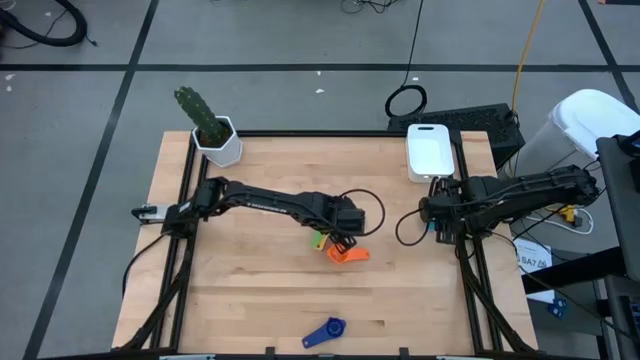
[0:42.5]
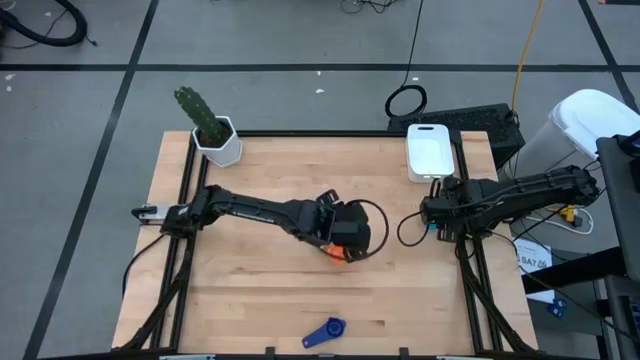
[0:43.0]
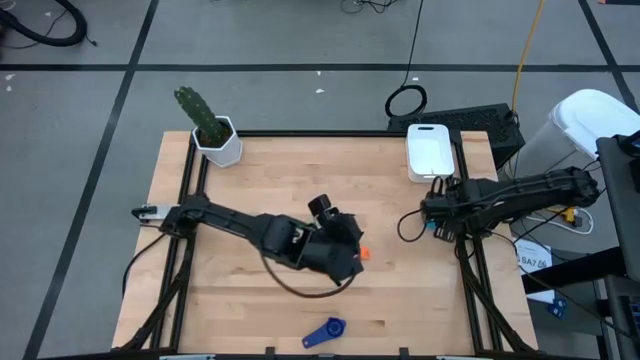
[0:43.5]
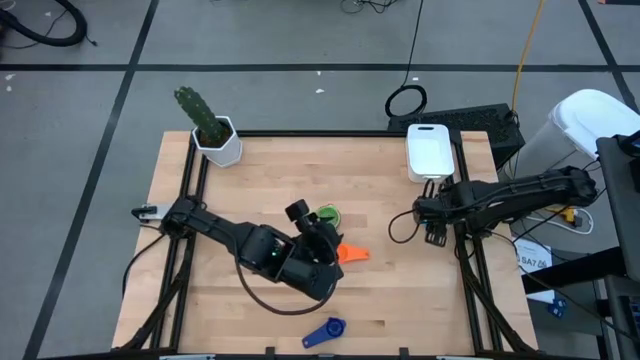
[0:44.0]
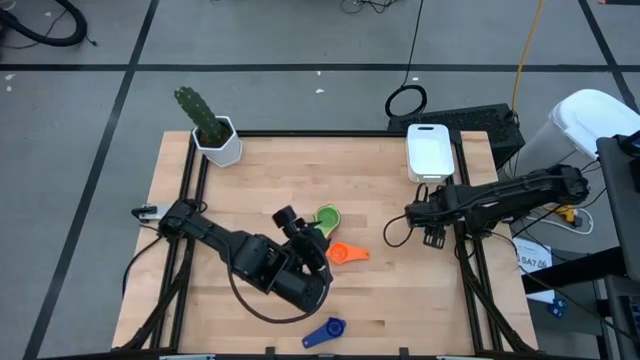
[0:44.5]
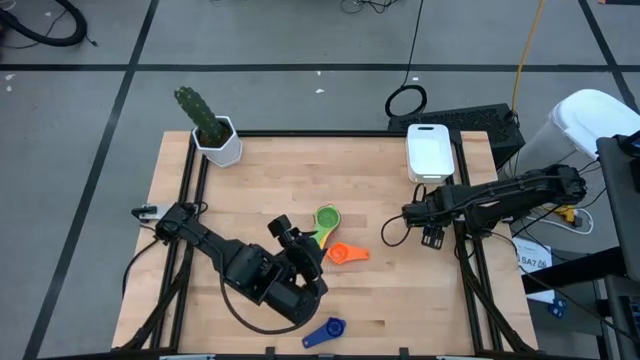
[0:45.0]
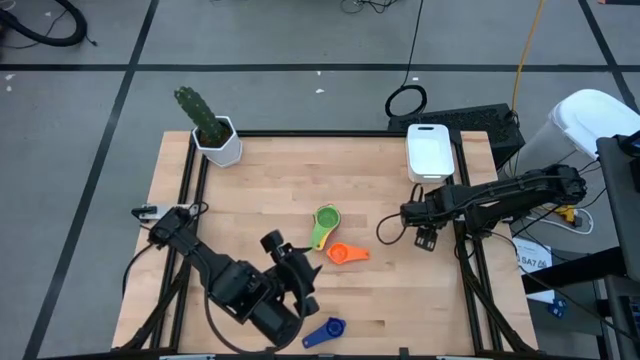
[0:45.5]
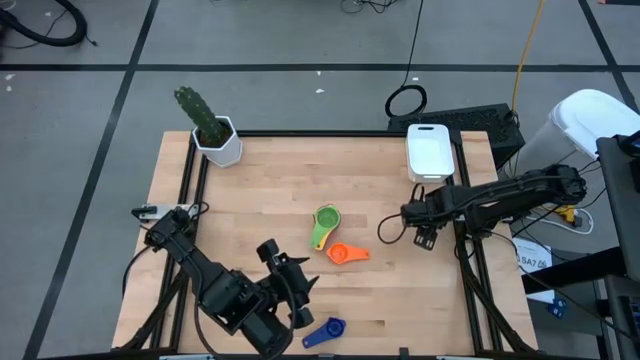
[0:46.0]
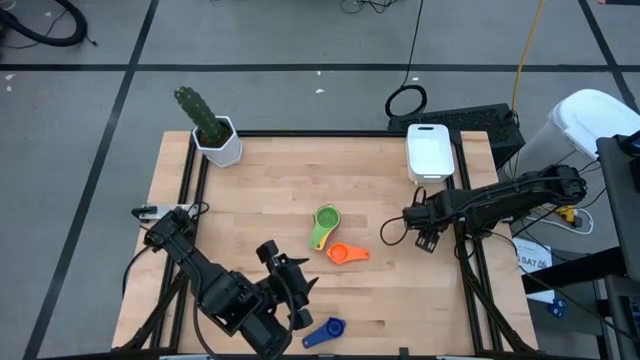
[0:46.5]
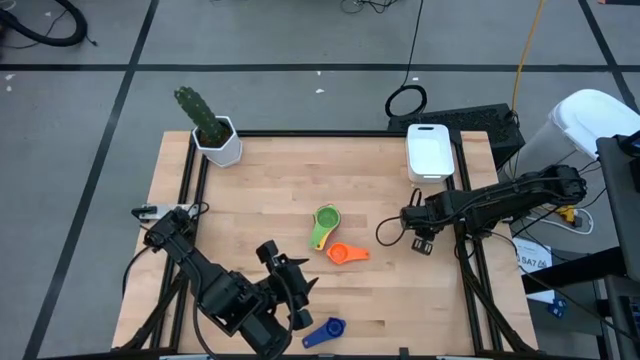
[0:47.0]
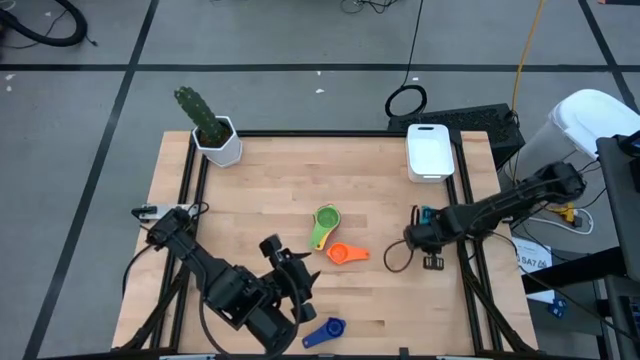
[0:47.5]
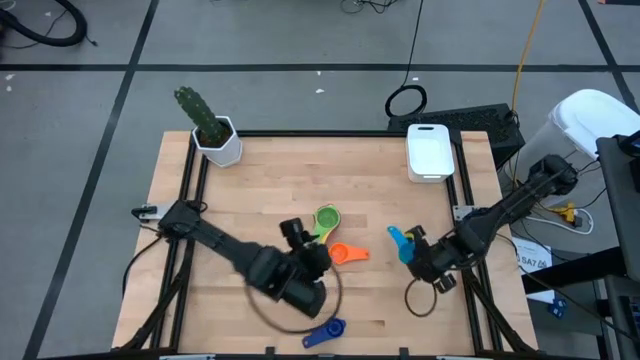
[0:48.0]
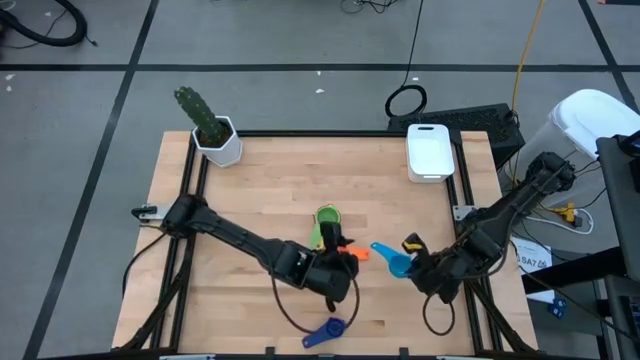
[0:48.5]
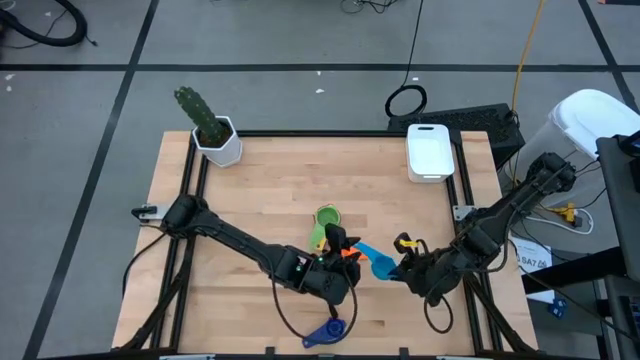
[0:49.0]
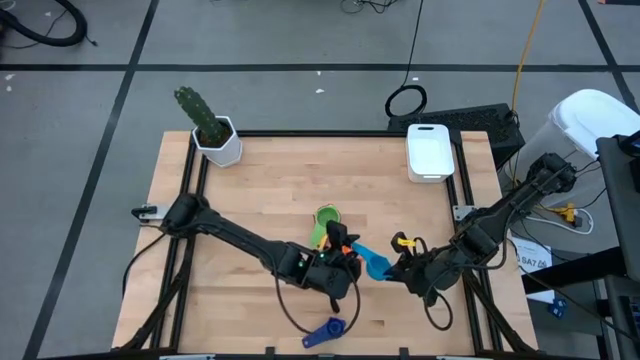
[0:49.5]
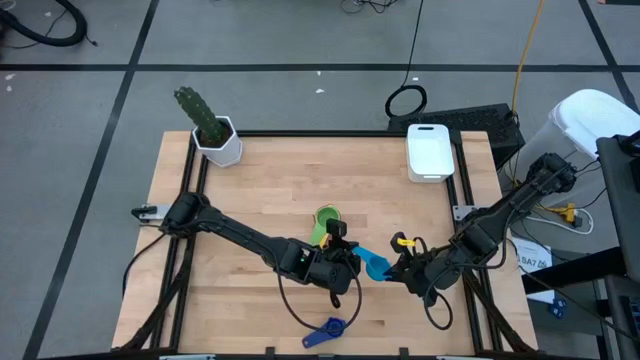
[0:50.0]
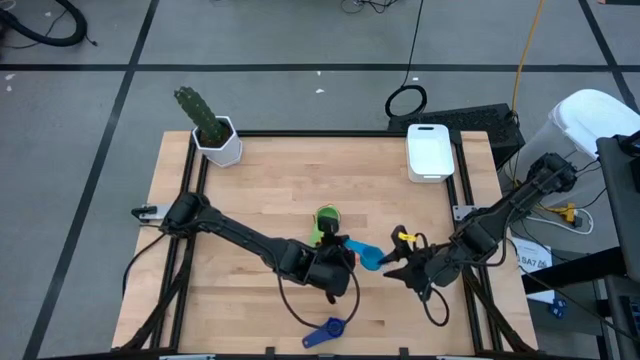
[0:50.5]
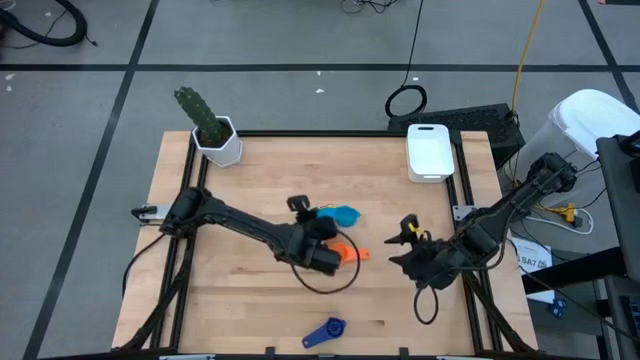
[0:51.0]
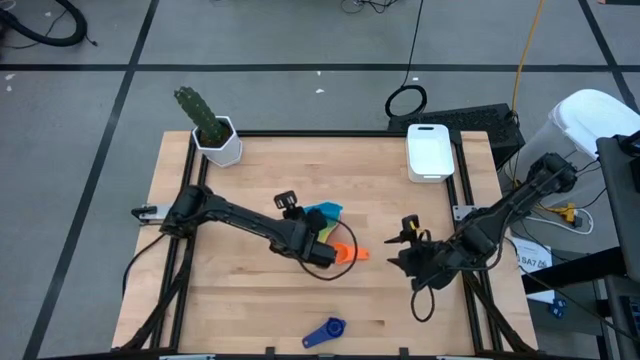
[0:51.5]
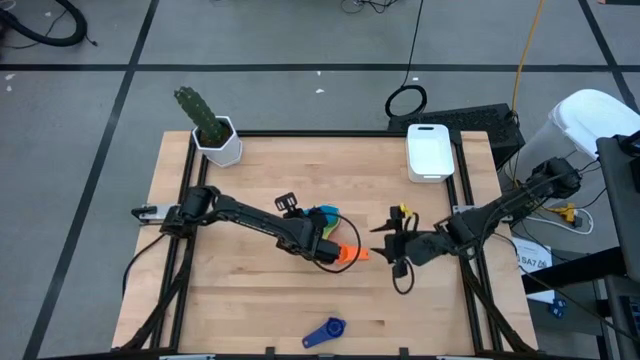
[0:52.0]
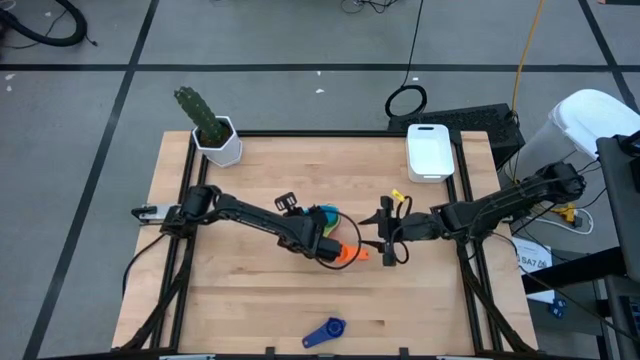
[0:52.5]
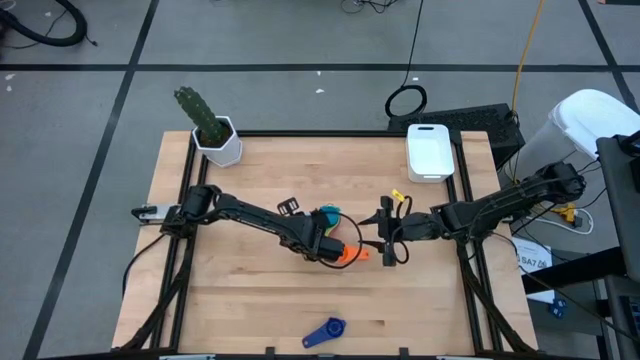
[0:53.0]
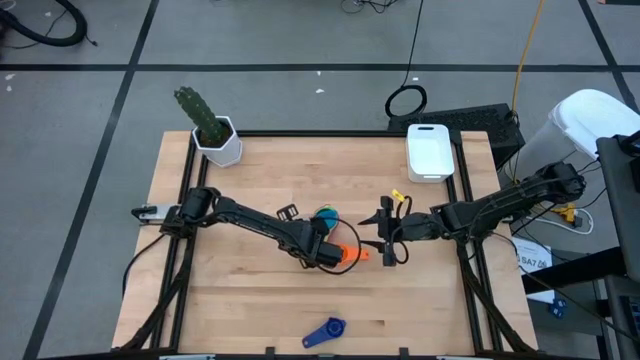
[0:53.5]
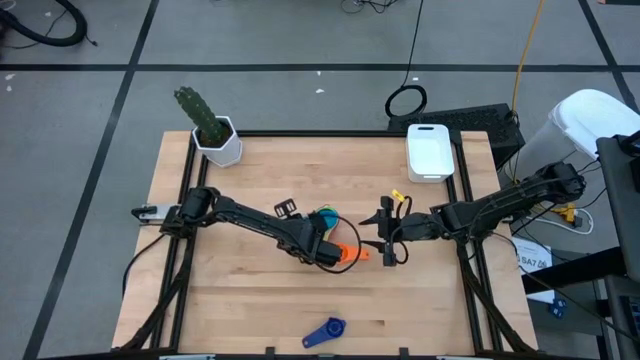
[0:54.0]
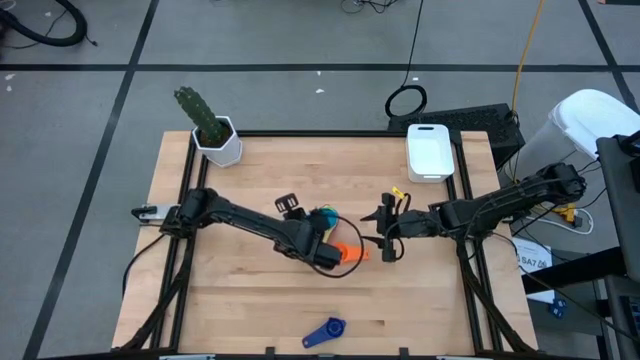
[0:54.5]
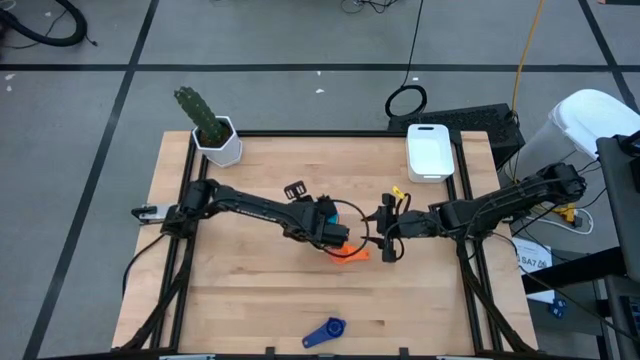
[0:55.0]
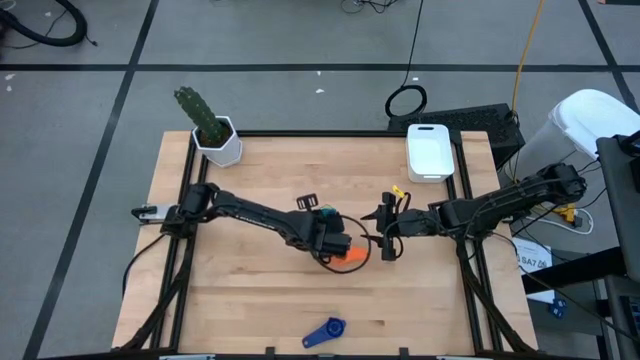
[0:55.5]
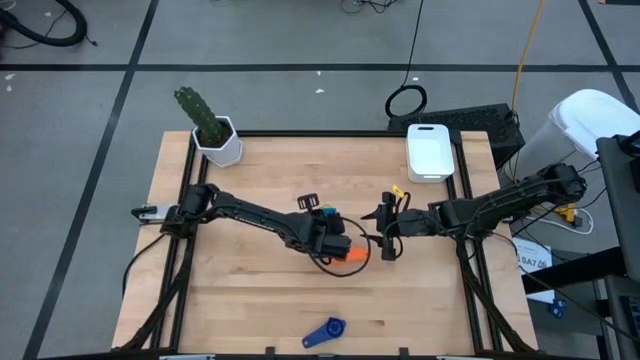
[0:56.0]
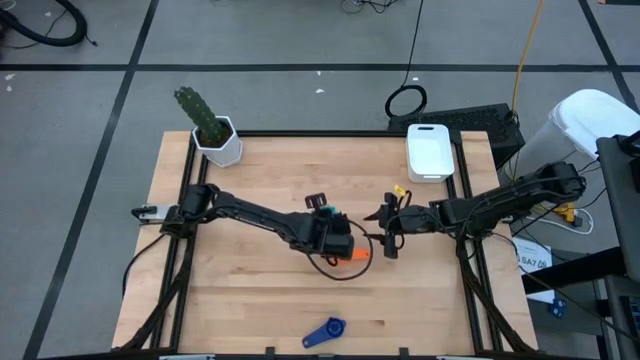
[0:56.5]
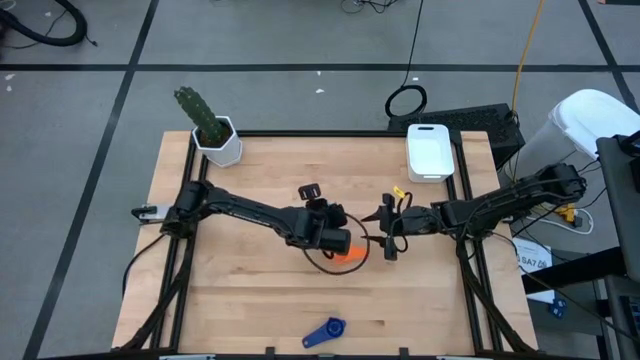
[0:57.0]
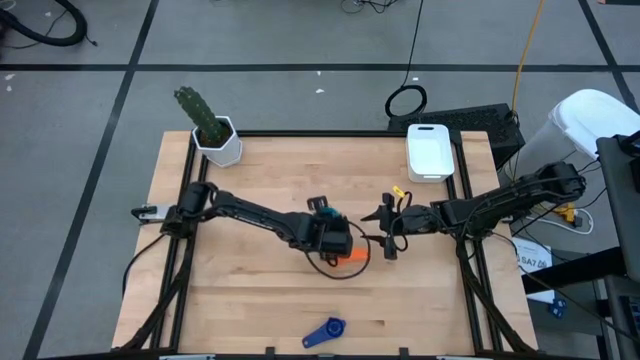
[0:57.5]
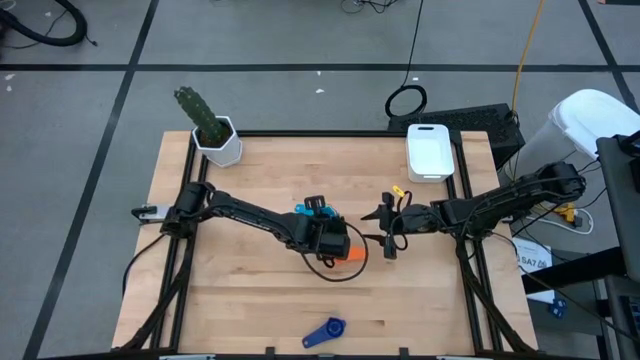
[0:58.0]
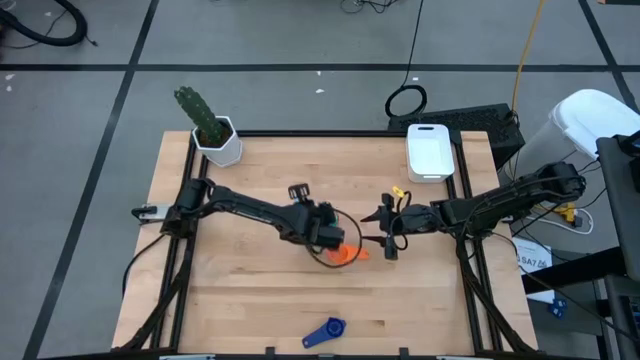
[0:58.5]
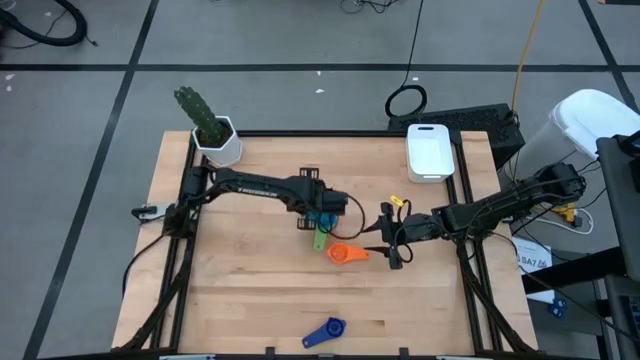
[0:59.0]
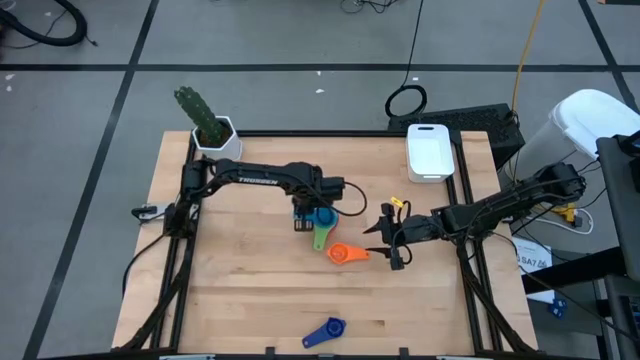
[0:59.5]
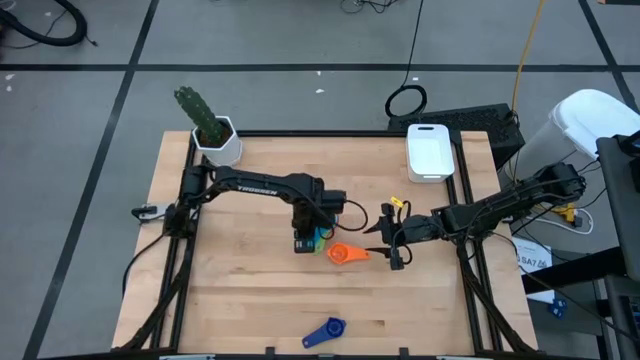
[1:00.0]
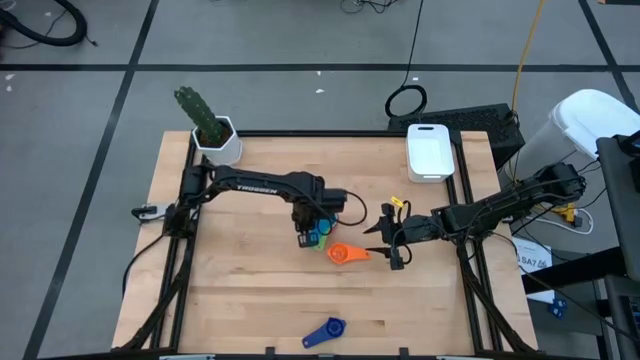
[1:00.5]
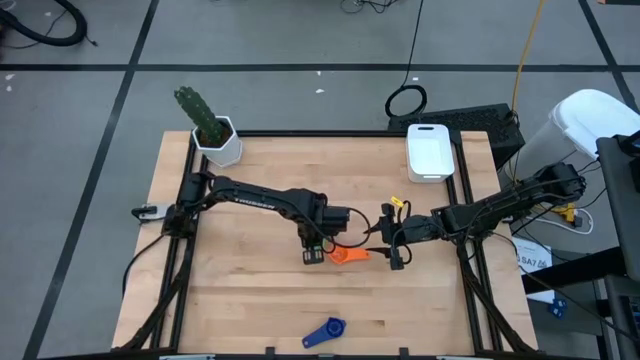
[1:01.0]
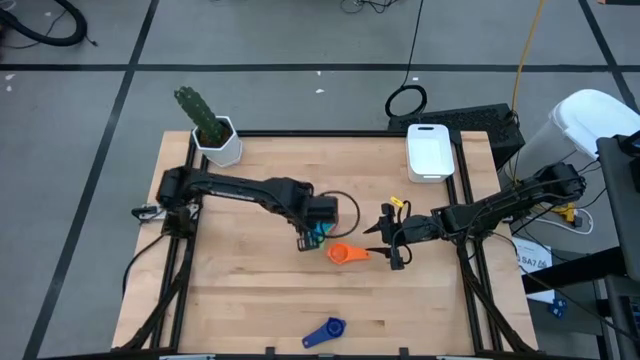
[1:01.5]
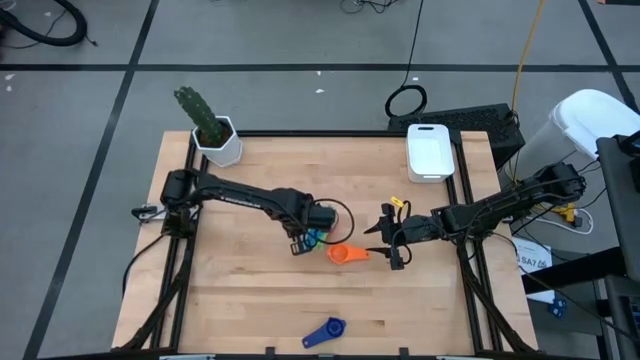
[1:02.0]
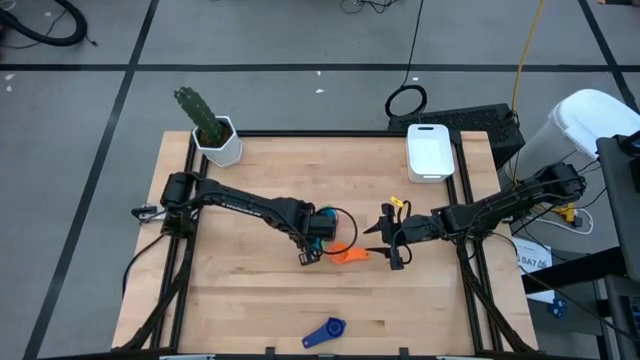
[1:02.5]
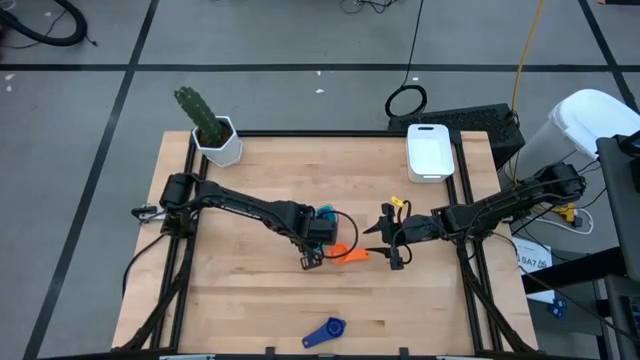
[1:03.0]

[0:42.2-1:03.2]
Task: Nest measuring cups in basket
Stack the light blue measuring cup on top of the green measuring cup

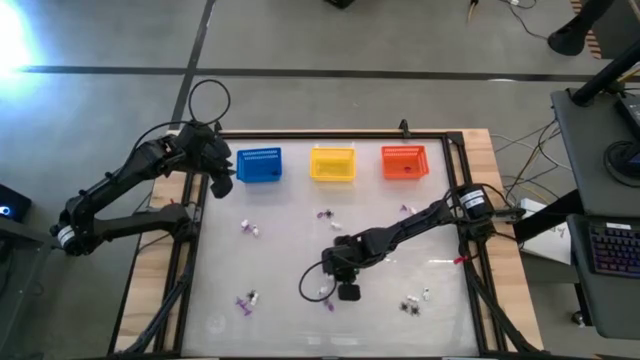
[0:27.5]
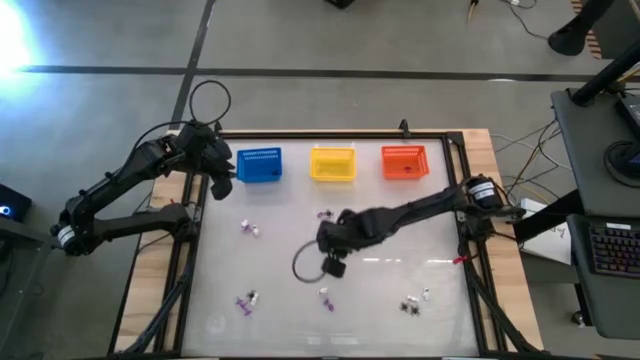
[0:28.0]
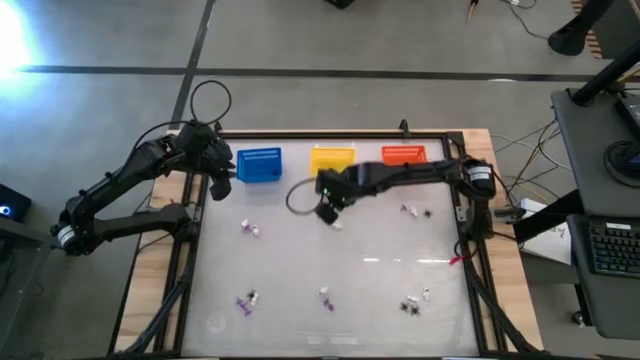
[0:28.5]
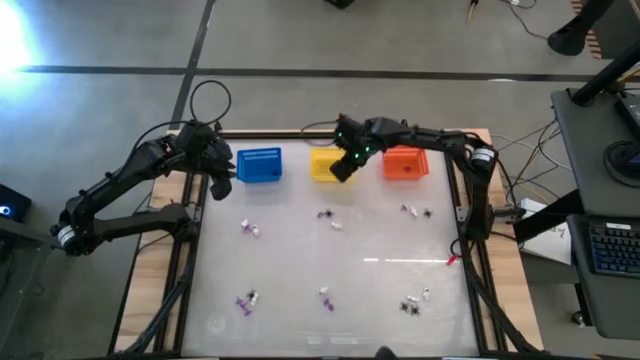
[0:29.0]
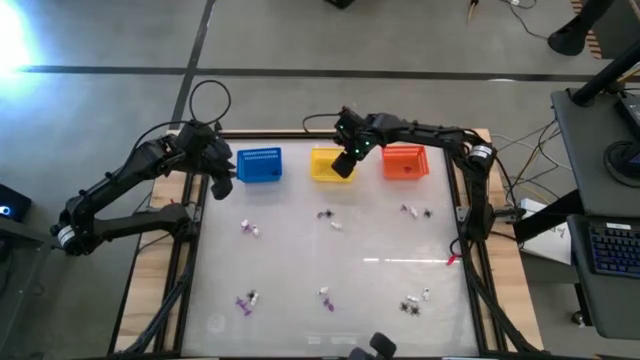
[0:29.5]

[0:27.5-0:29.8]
Task: Sort Halloween decoration
Put the white skeleton toy into the yellow bin
